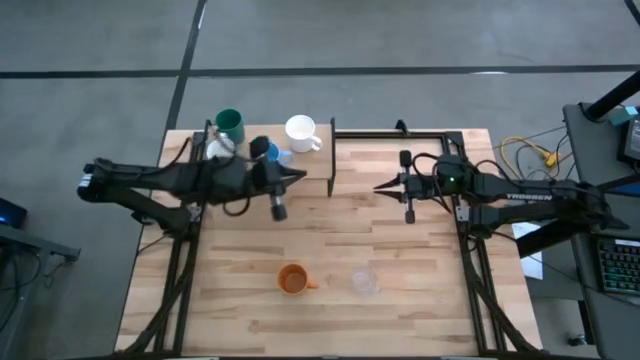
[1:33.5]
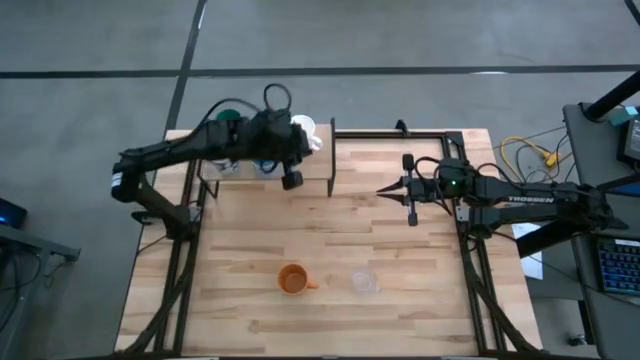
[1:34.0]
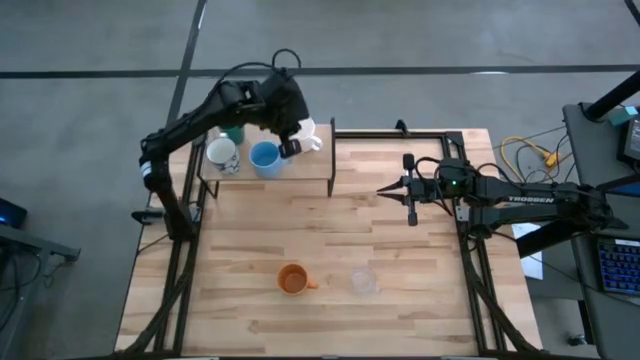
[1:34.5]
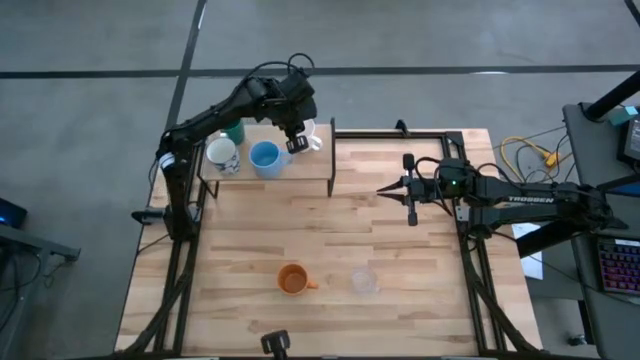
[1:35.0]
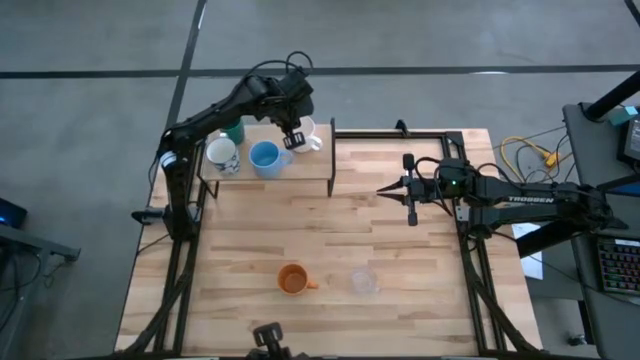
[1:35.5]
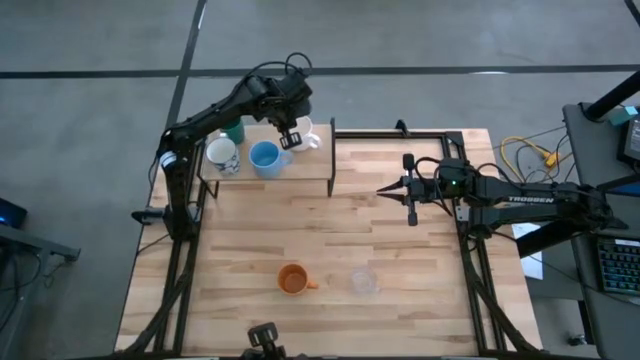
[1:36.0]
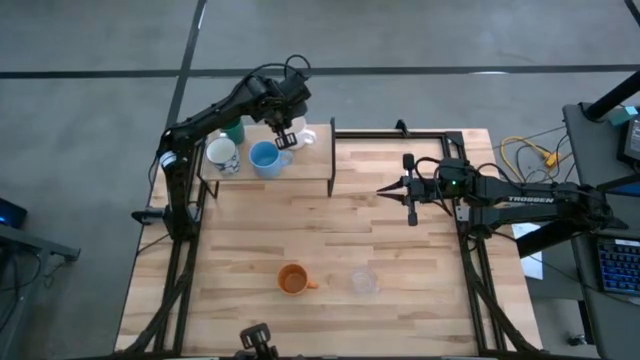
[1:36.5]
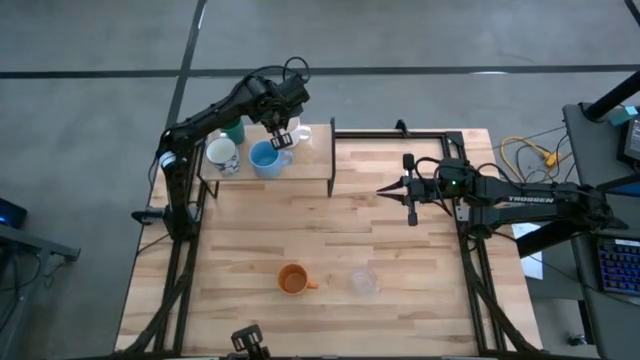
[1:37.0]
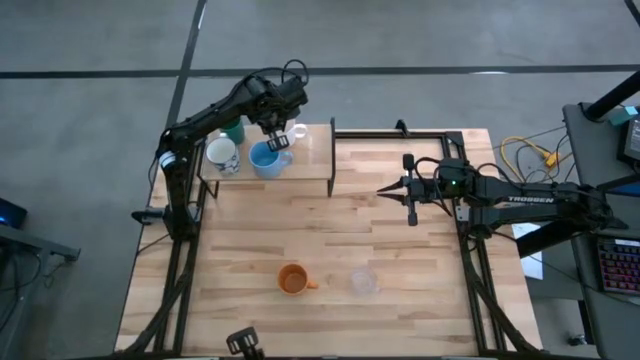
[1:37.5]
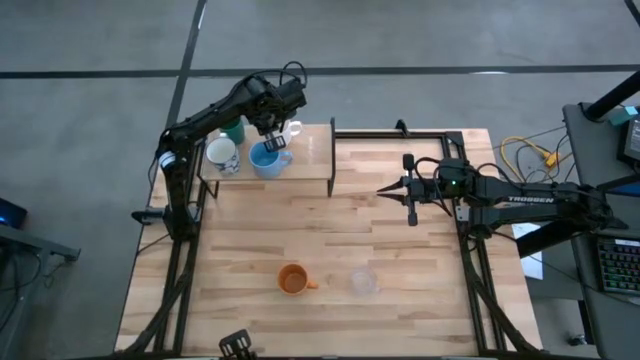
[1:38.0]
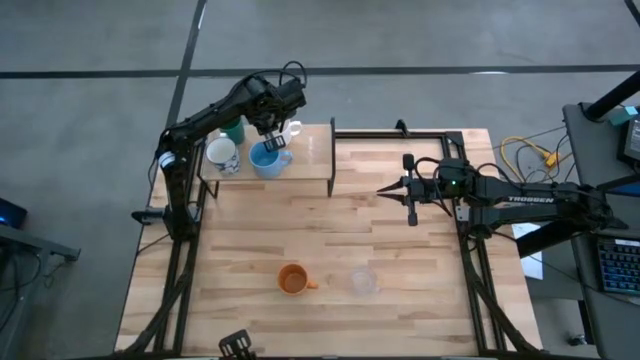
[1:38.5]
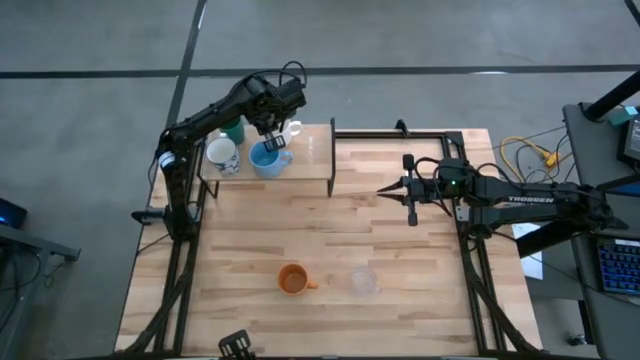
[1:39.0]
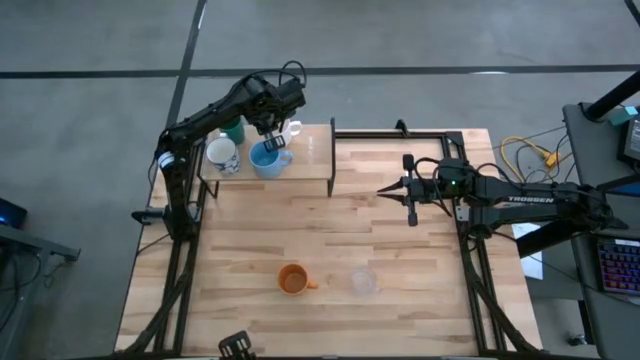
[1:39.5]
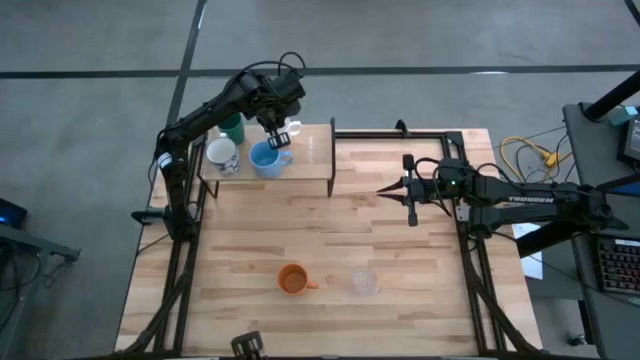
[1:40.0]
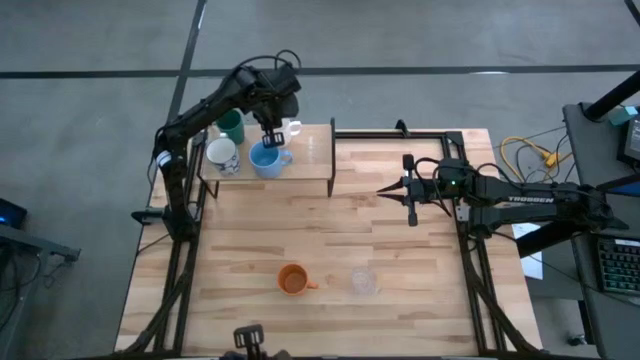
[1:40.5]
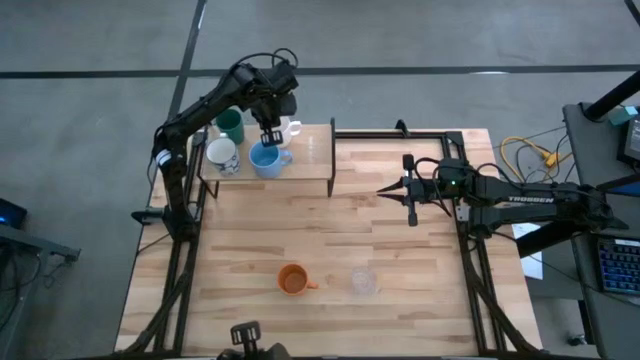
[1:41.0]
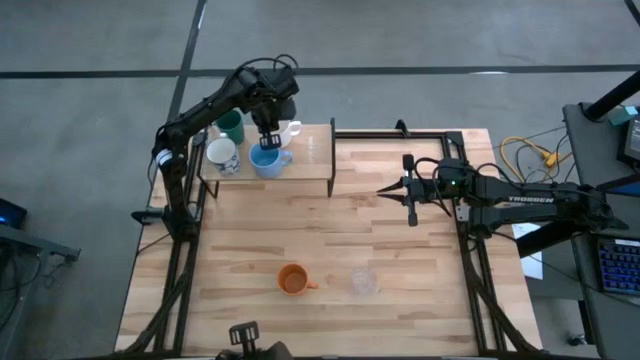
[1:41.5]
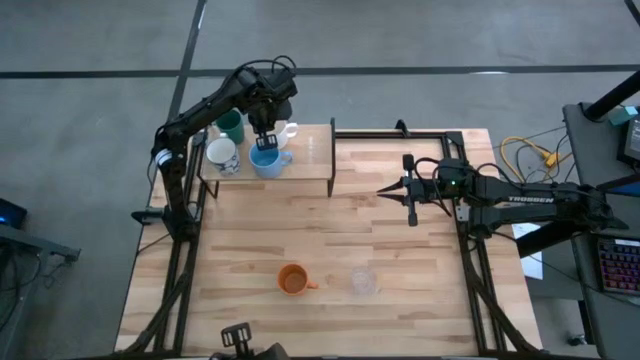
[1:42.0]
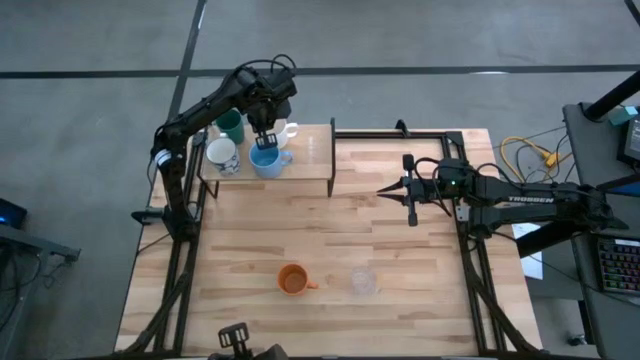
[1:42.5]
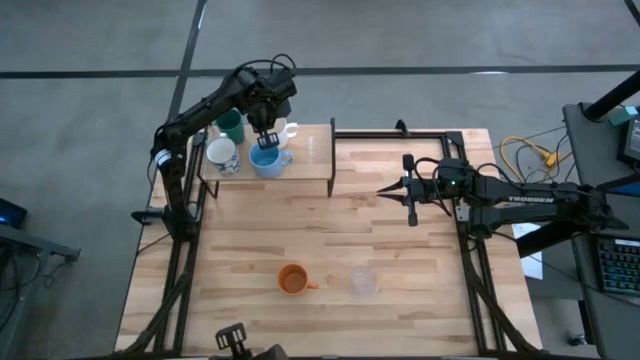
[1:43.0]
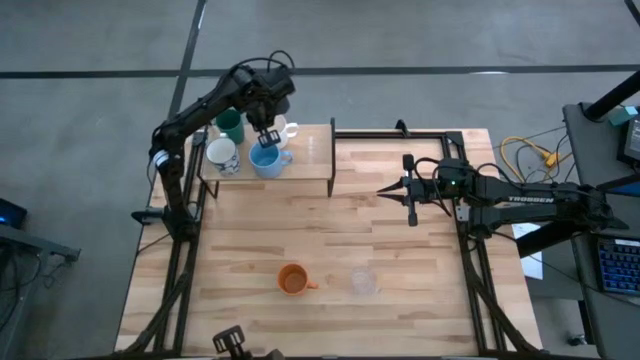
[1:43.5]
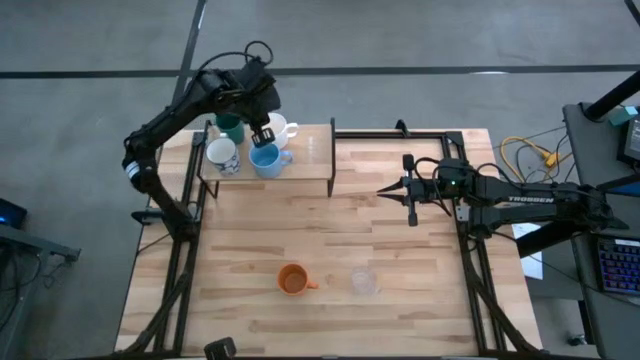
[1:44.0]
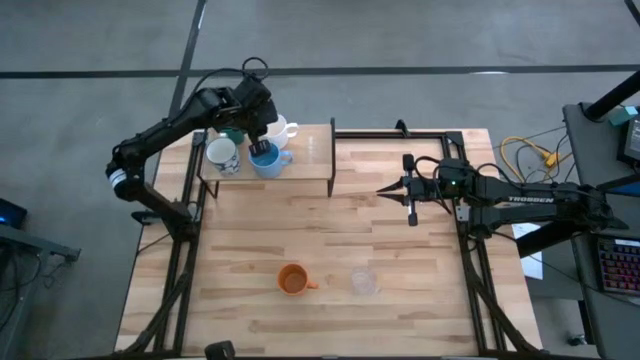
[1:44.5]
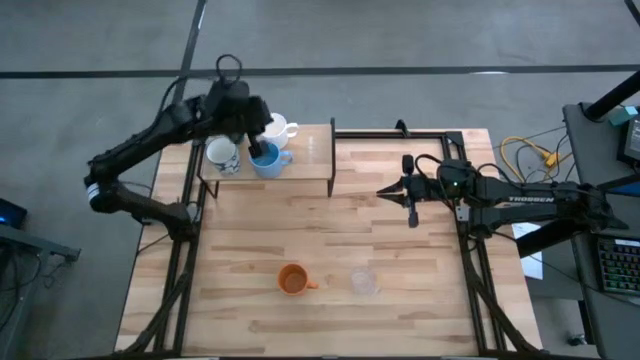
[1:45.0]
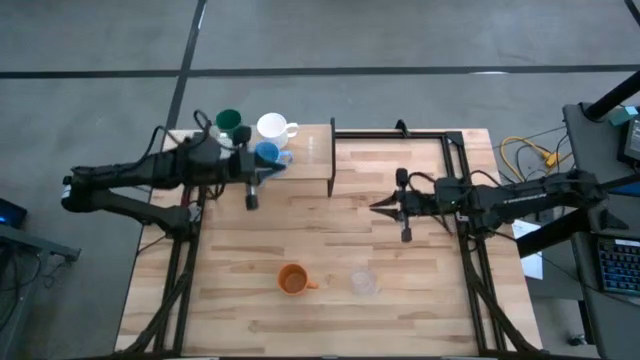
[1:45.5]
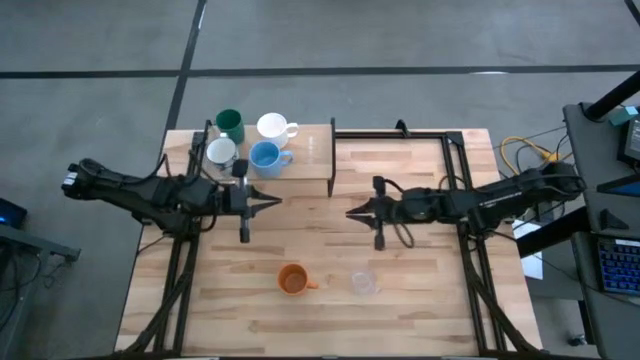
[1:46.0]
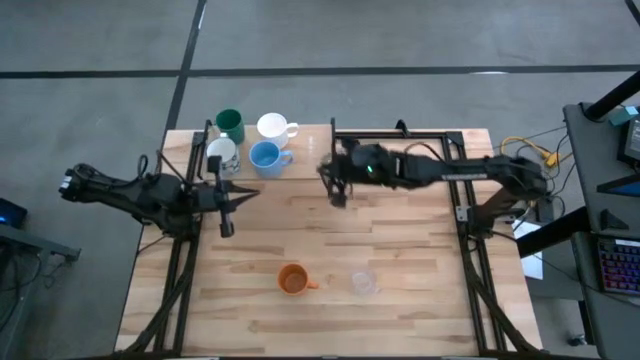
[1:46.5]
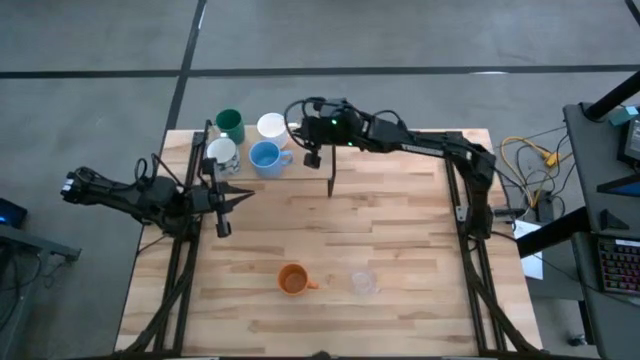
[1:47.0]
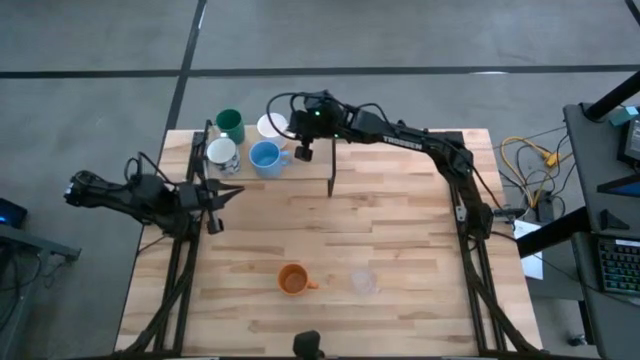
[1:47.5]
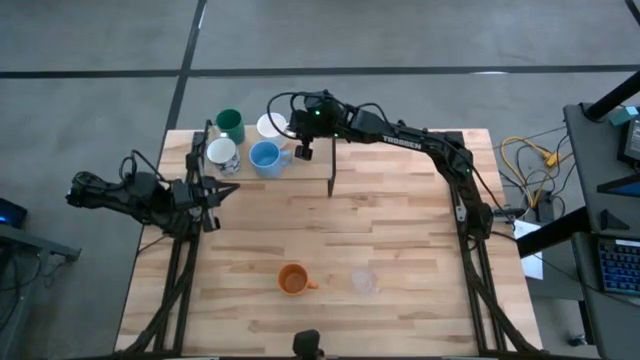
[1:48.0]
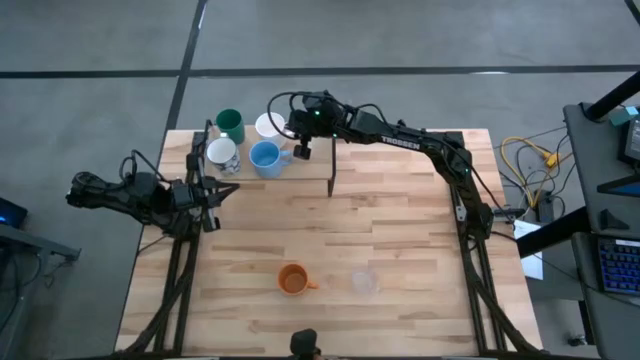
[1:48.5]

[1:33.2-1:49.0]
Task: Stack small to large cups/mugs on shelf
Put the white mug on the shelf

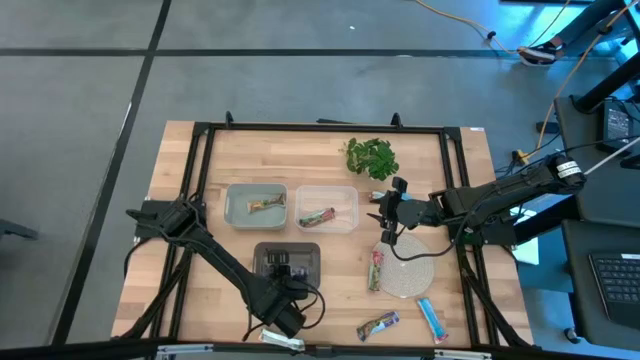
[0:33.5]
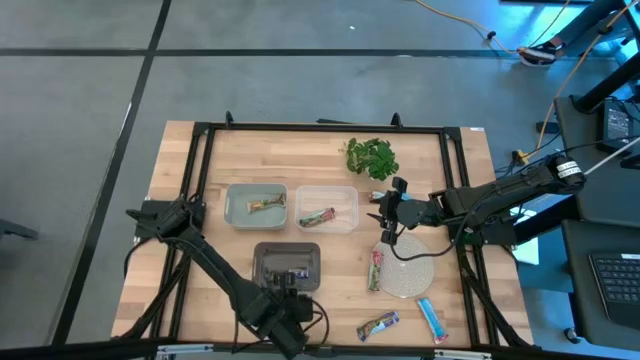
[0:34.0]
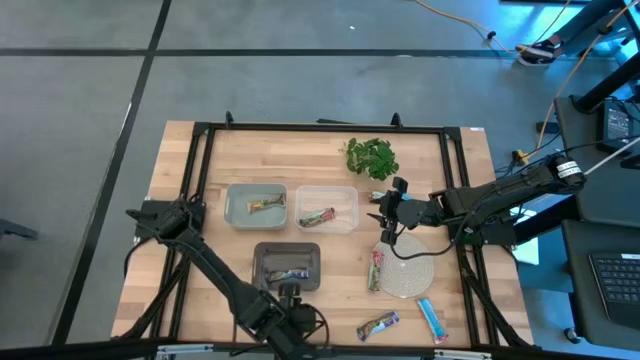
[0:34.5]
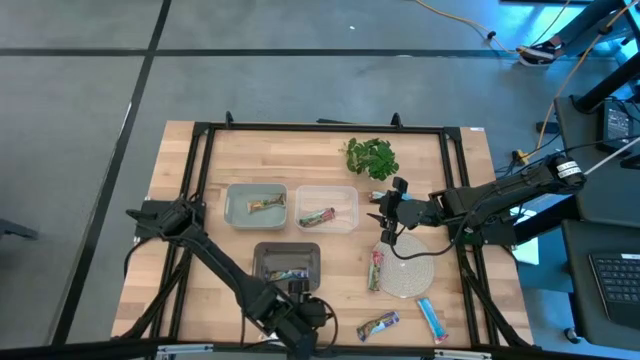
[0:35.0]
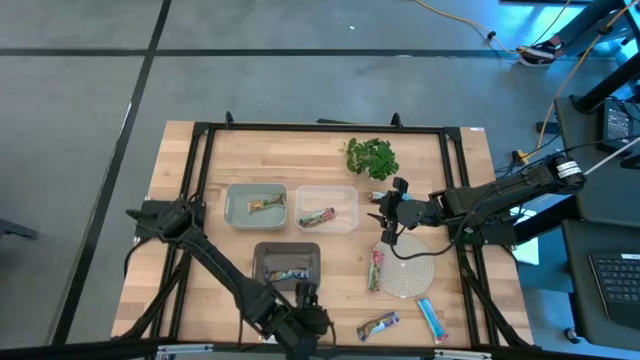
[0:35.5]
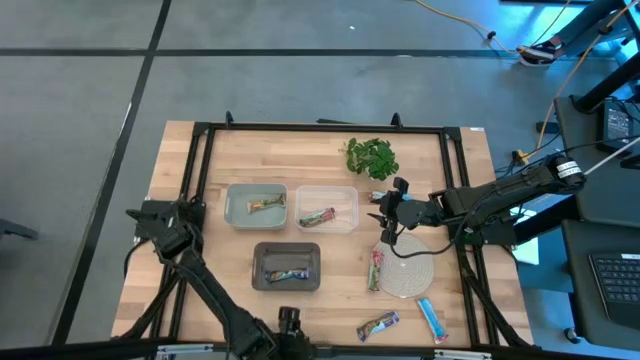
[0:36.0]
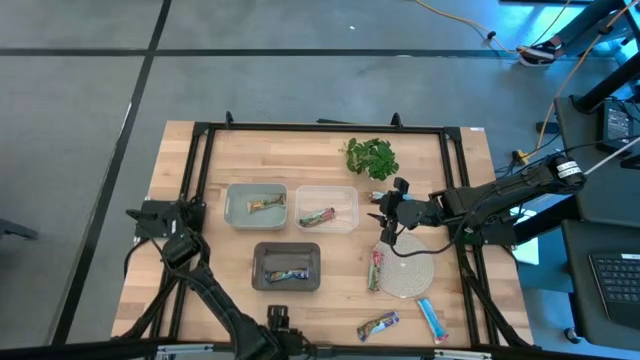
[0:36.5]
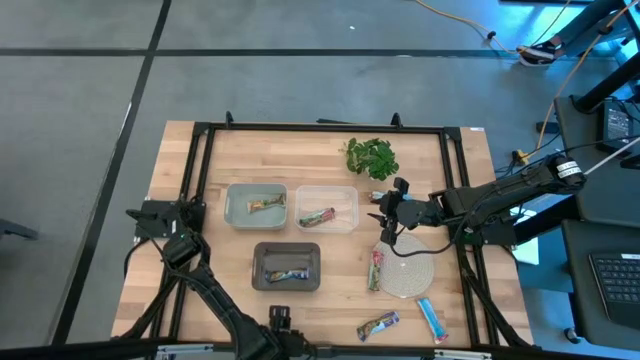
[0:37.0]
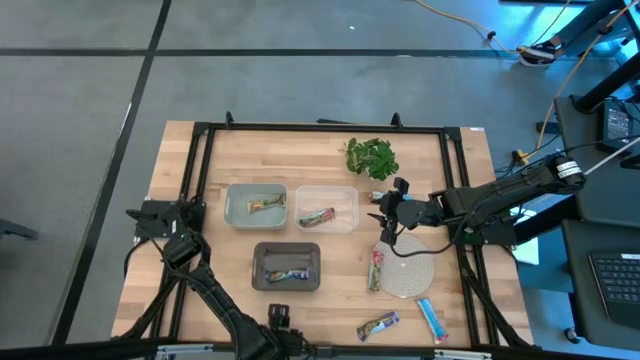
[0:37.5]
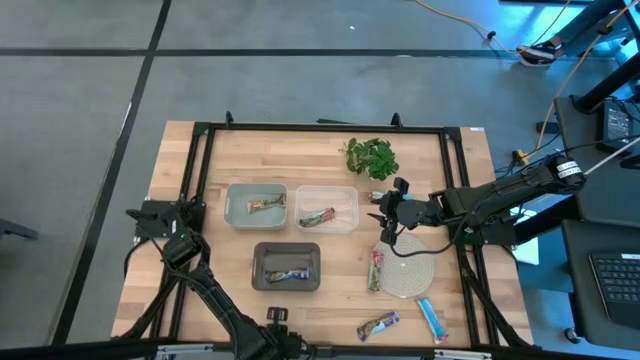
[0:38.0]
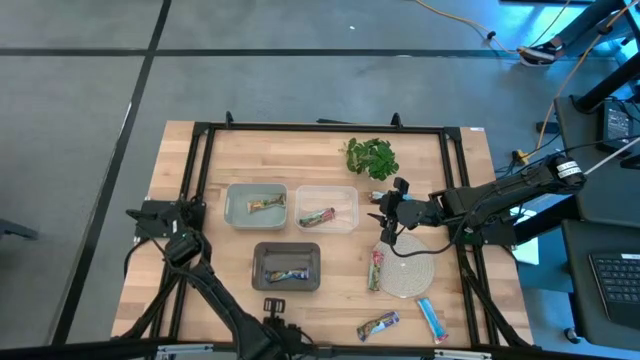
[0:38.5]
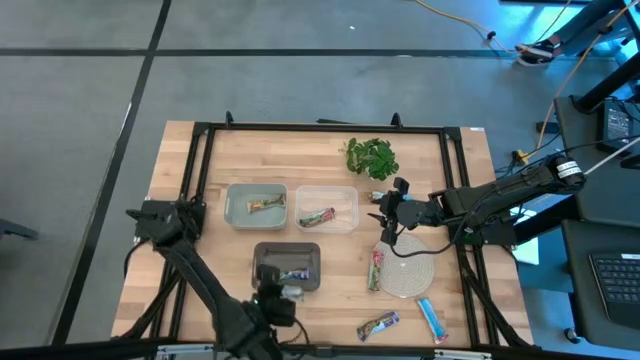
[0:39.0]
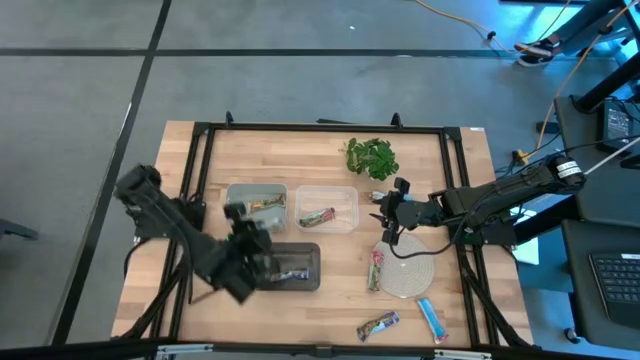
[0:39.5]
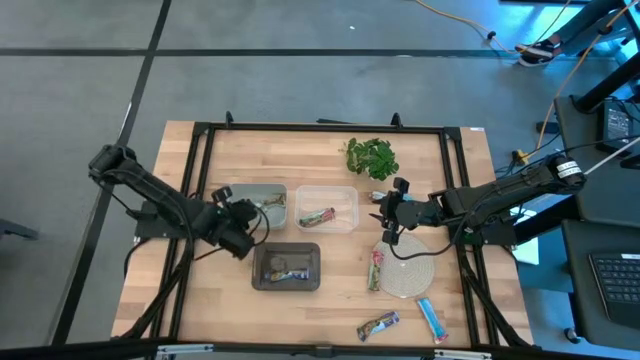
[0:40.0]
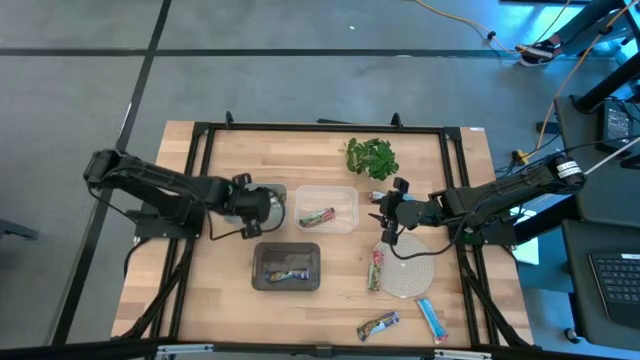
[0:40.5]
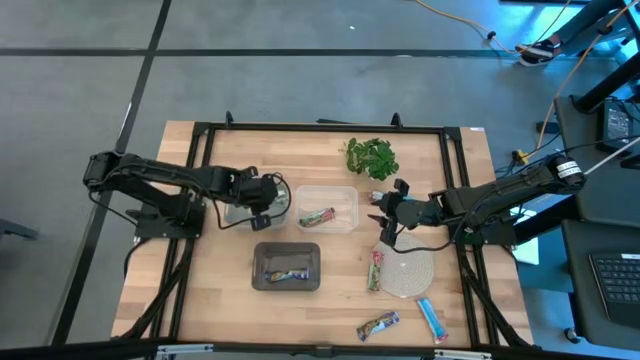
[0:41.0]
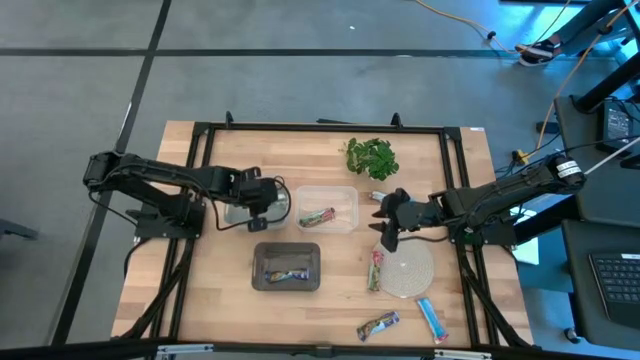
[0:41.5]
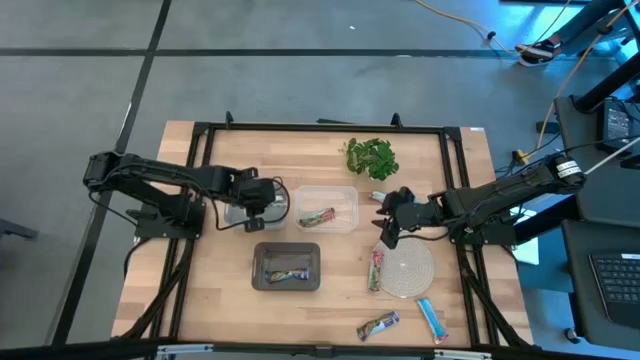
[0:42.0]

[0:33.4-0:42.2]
Task: Pick and place Granola Bars by type
Put the yellow granola bar into the gray bin
